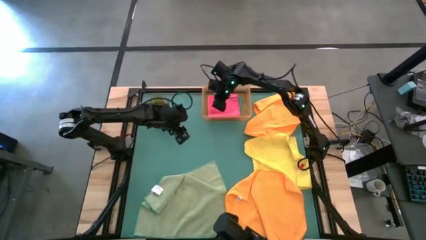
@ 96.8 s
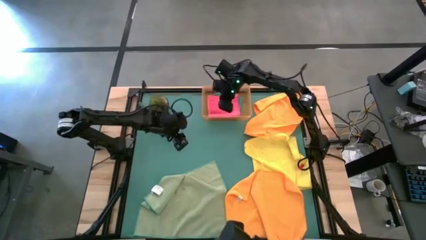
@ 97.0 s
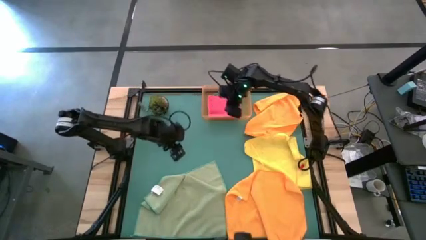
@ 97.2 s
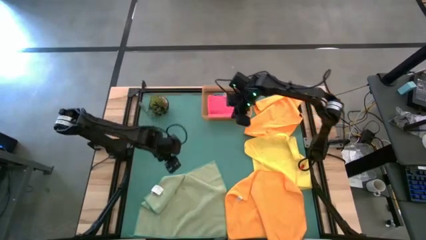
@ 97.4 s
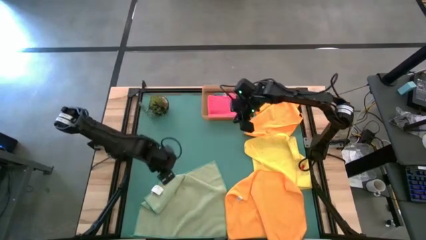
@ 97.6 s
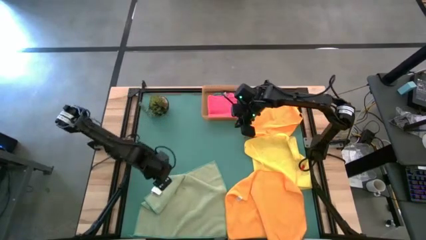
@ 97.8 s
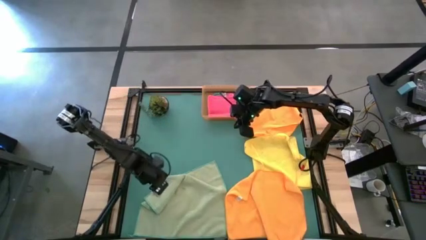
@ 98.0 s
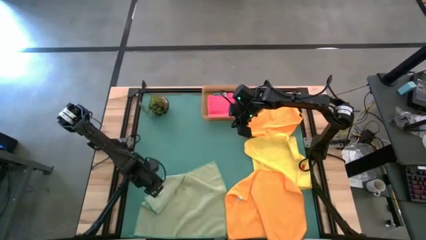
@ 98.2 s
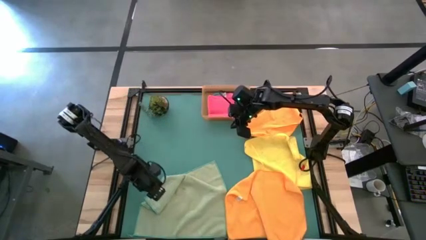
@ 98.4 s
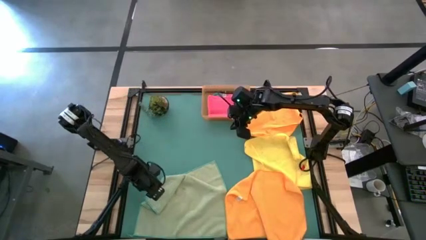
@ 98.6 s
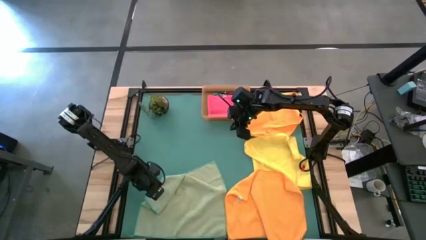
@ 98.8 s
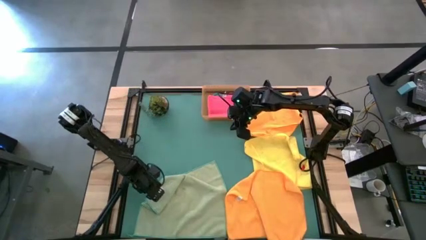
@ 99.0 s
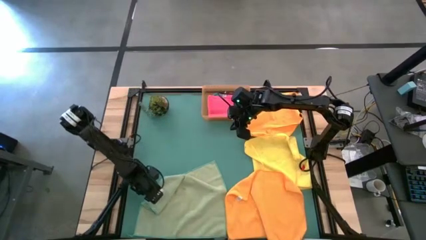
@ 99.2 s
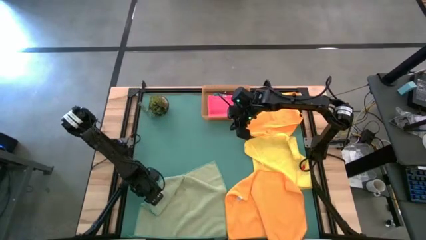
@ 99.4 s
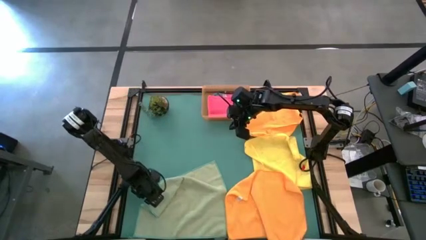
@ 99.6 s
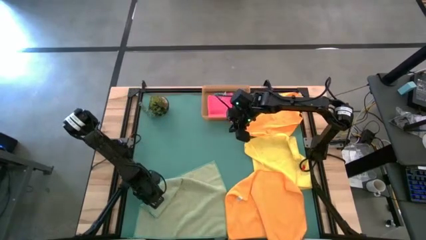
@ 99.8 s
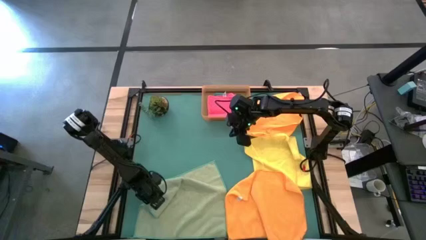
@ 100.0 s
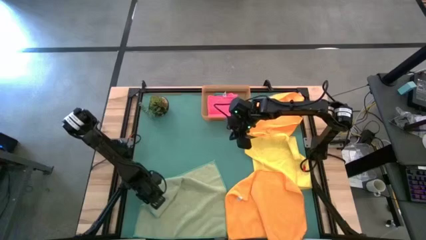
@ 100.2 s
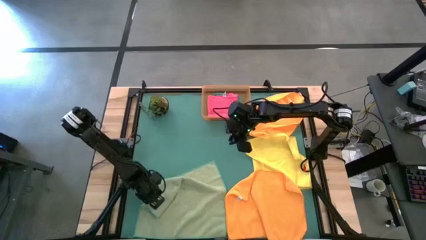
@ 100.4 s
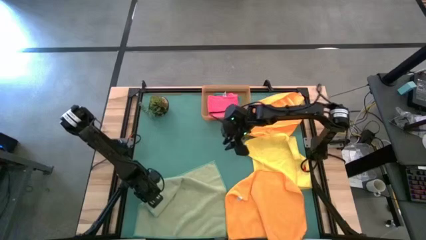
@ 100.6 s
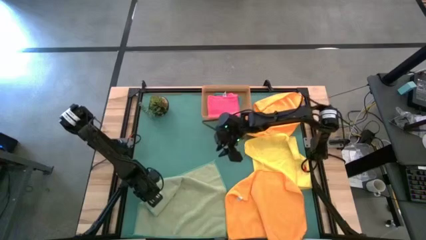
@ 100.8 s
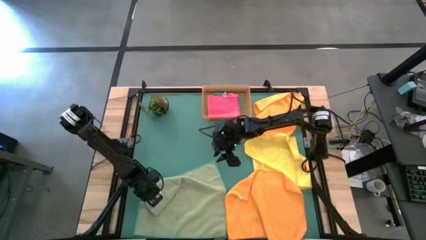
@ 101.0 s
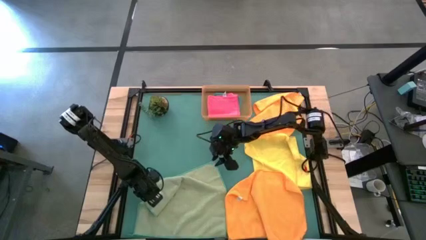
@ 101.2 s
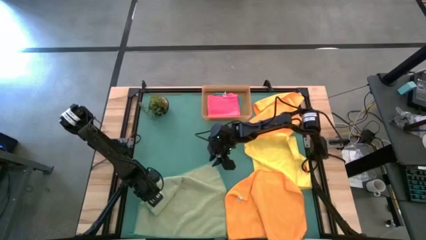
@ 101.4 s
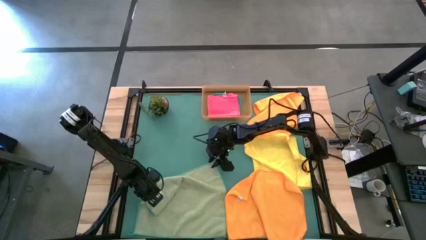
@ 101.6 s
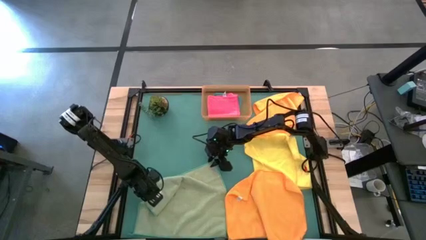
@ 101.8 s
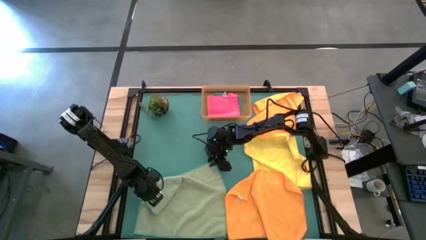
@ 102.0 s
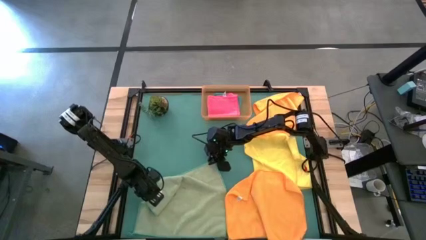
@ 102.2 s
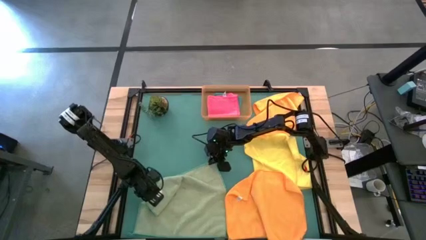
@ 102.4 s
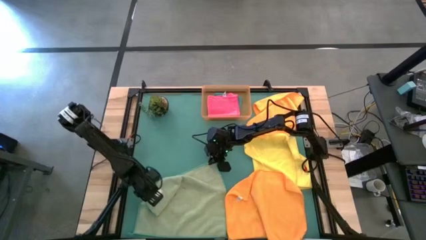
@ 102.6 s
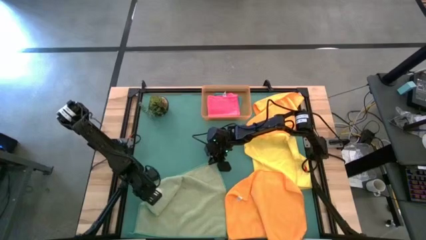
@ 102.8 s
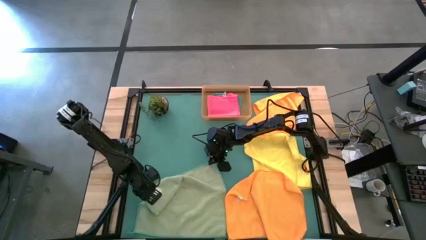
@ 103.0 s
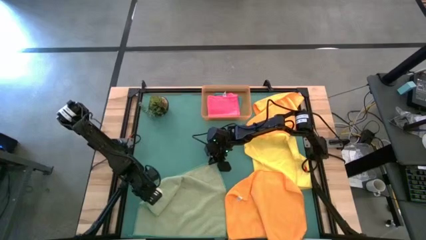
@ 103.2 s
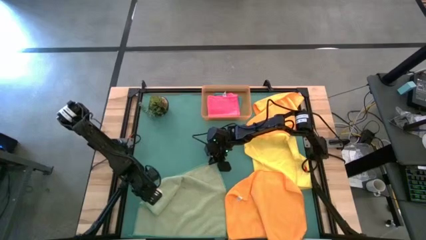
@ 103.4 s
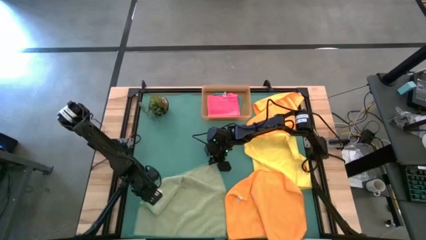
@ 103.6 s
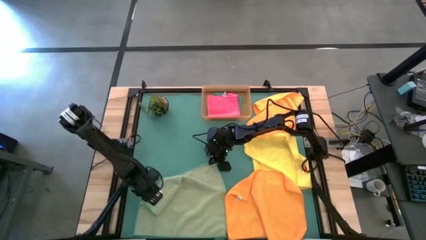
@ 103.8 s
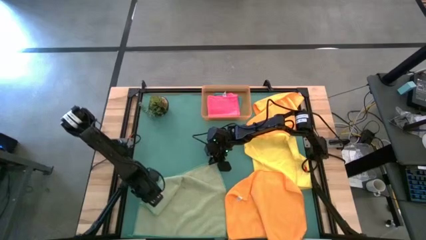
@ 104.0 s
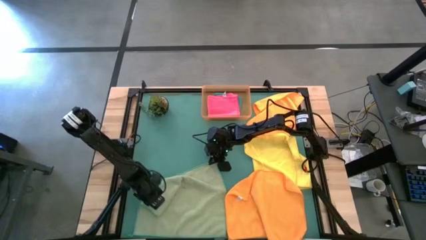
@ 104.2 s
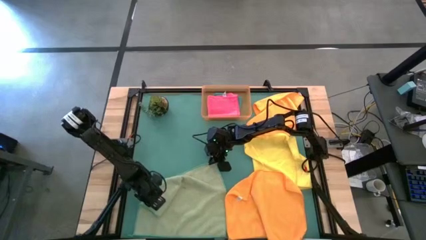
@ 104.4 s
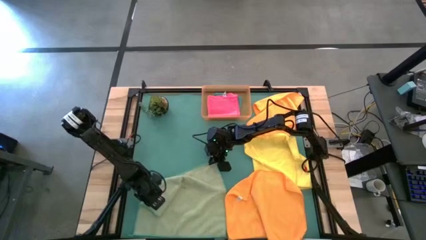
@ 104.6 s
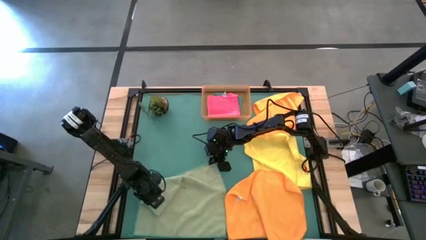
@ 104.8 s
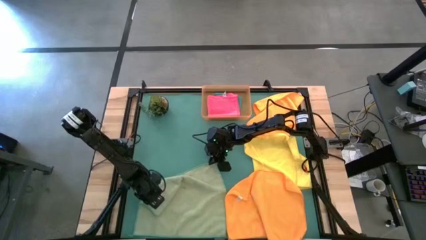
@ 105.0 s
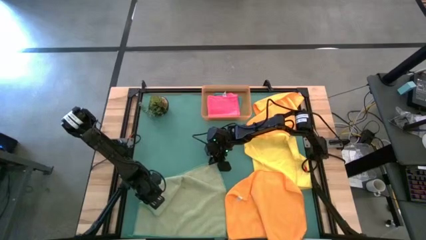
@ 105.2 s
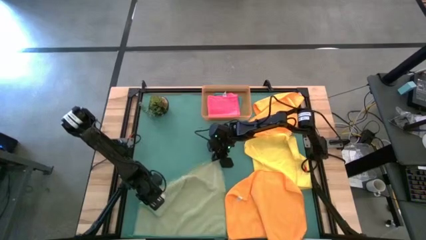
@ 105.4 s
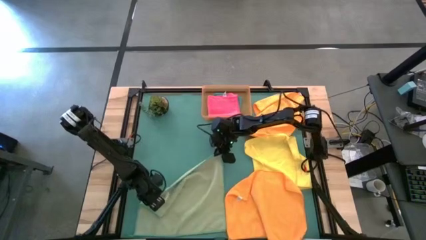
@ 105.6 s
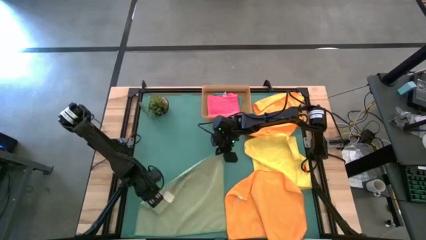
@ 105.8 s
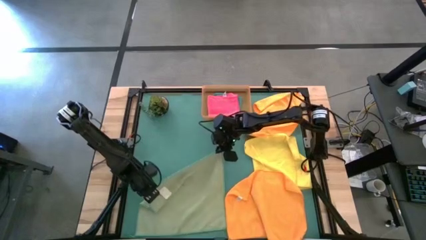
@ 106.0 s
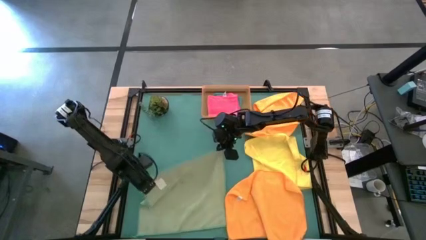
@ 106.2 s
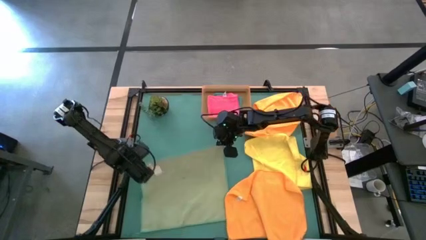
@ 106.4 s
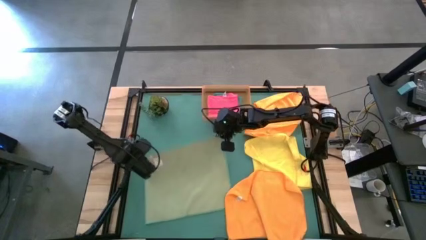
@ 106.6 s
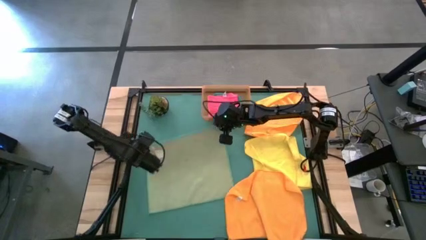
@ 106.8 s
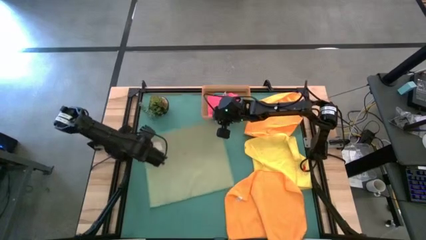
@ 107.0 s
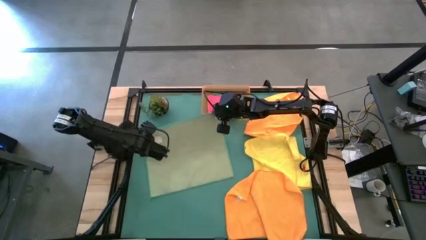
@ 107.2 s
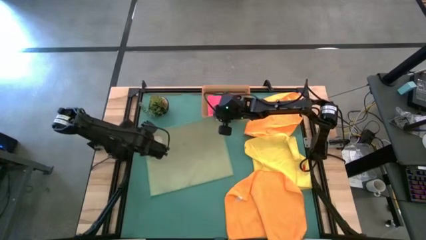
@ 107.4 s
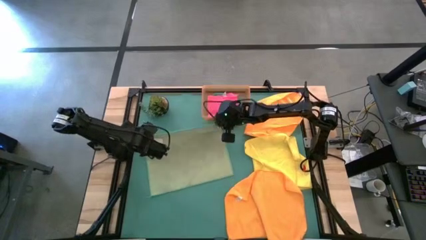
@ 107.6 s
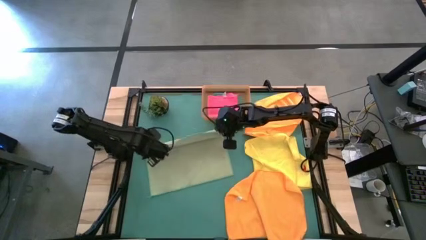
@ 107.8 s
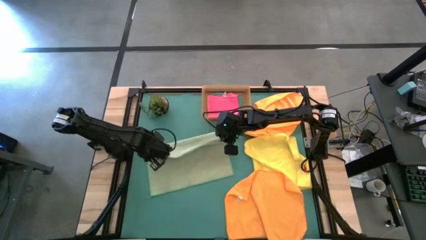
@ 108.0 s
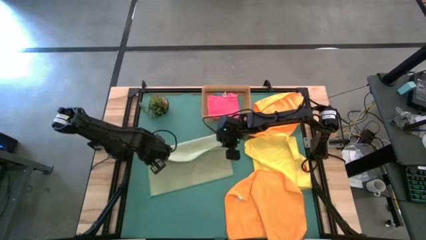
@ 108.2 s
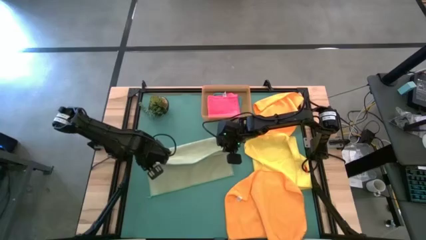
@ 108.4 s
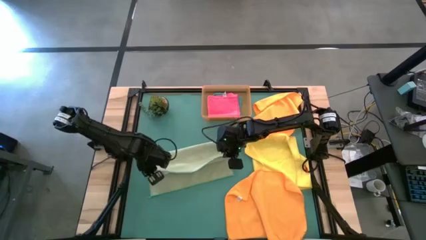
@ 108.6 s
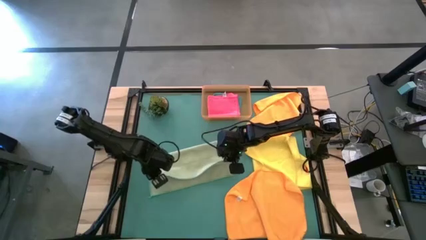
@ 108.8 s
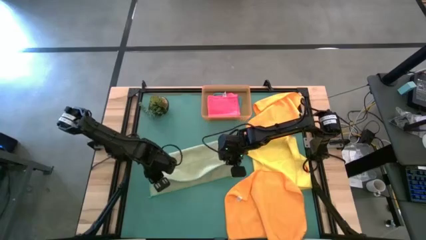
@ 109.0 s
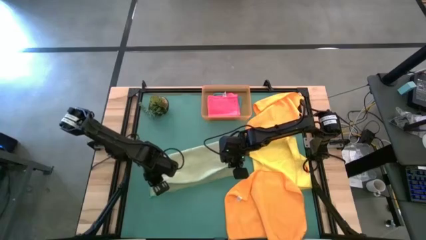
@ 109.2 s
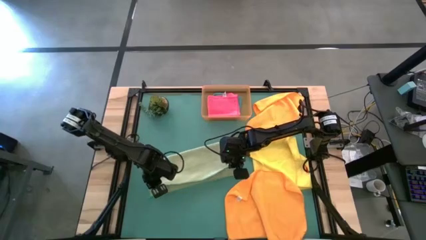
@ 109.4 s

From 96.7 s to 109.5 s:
Task: Fold microfiber towels
Fold the green microfiber towel
